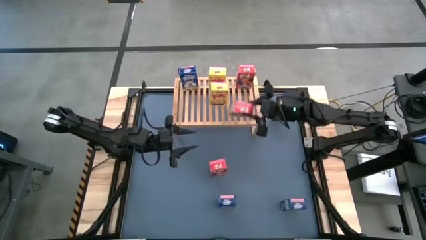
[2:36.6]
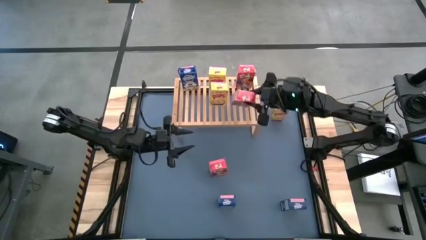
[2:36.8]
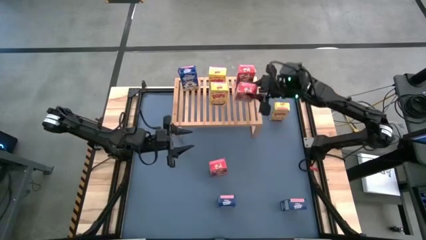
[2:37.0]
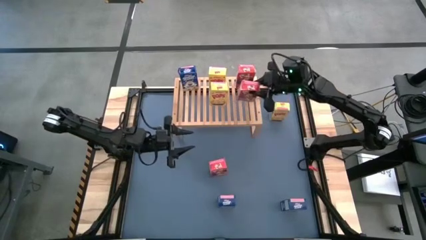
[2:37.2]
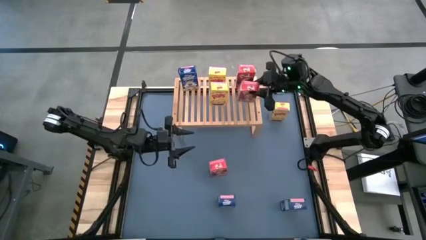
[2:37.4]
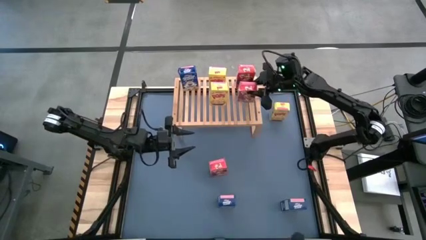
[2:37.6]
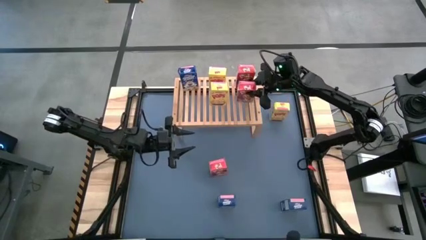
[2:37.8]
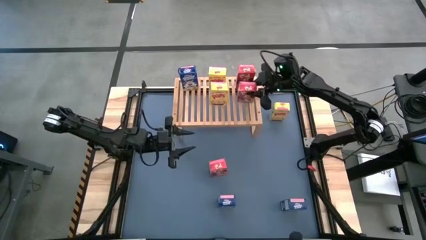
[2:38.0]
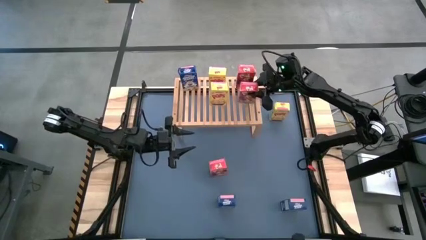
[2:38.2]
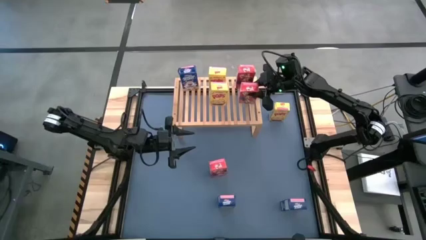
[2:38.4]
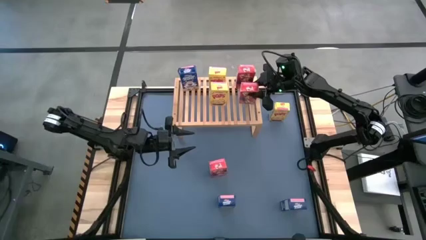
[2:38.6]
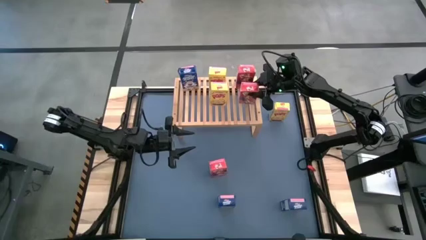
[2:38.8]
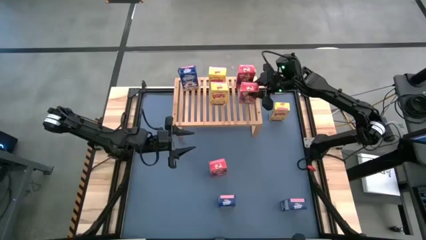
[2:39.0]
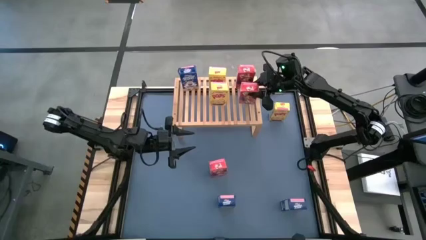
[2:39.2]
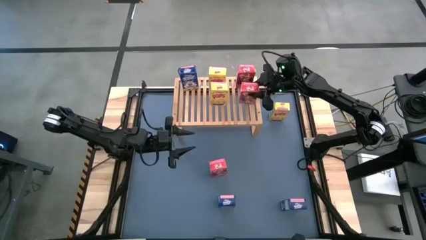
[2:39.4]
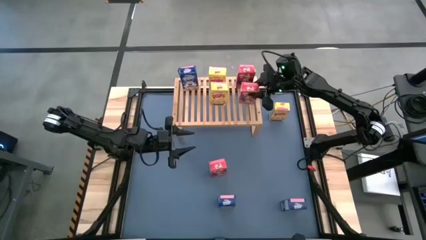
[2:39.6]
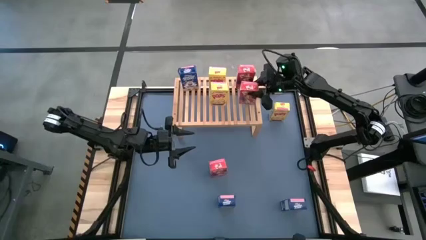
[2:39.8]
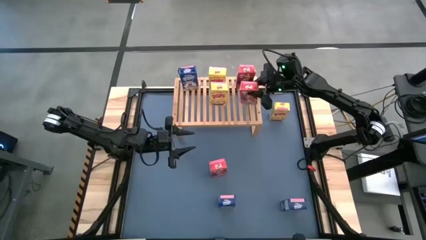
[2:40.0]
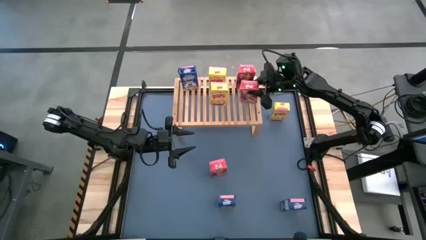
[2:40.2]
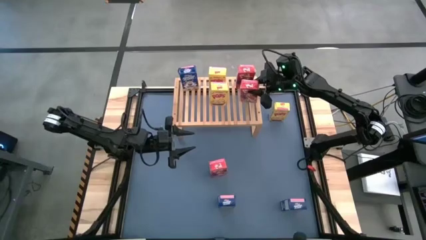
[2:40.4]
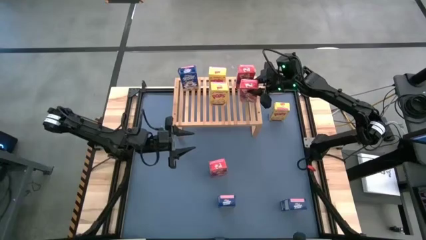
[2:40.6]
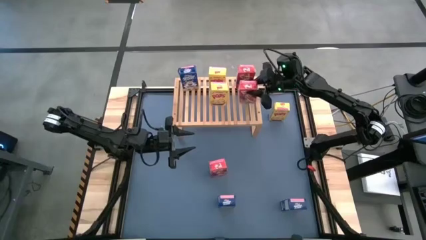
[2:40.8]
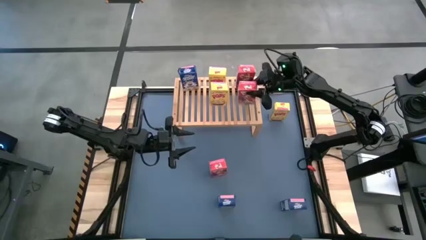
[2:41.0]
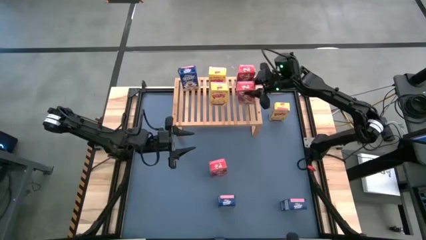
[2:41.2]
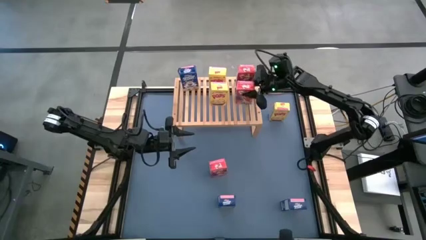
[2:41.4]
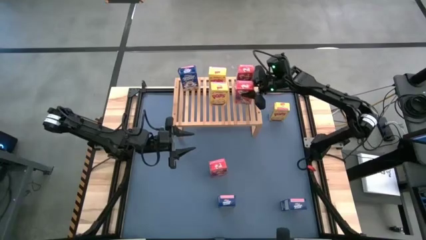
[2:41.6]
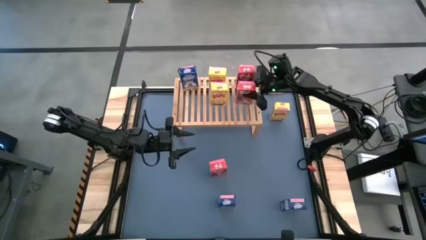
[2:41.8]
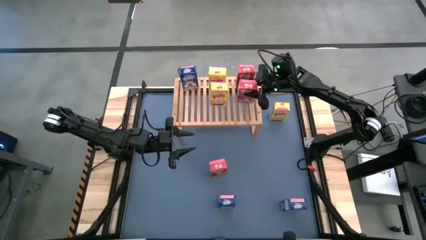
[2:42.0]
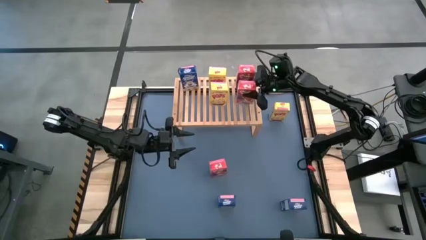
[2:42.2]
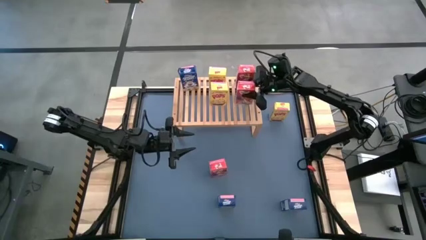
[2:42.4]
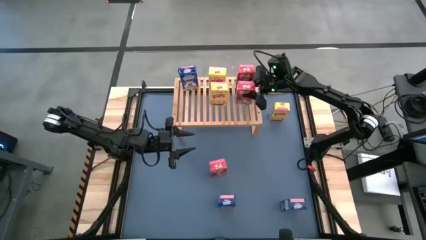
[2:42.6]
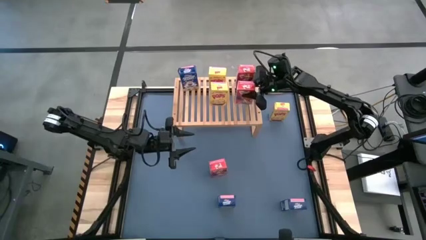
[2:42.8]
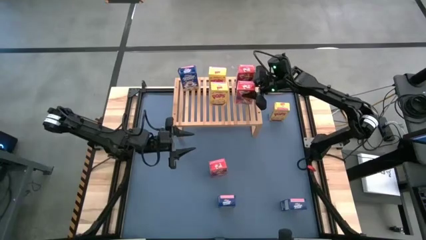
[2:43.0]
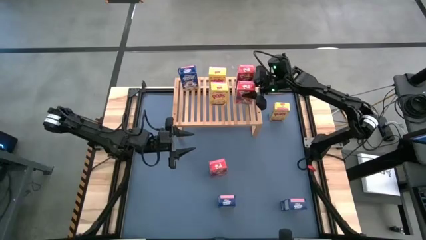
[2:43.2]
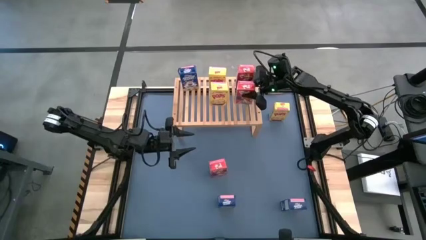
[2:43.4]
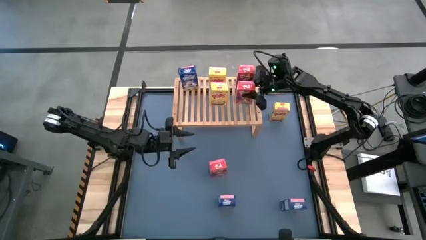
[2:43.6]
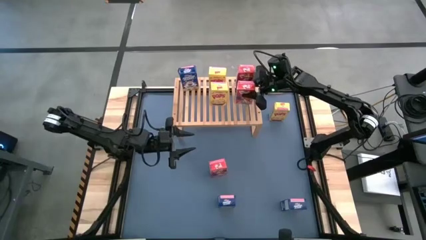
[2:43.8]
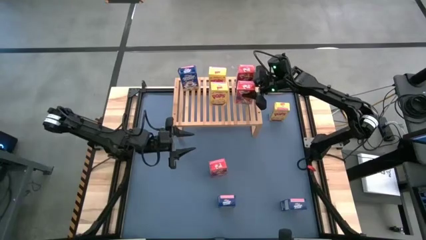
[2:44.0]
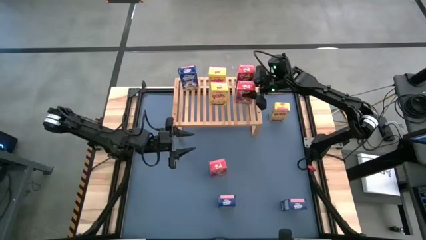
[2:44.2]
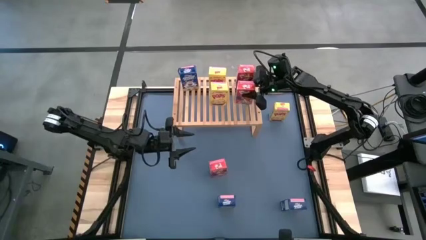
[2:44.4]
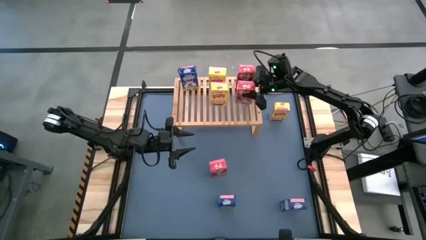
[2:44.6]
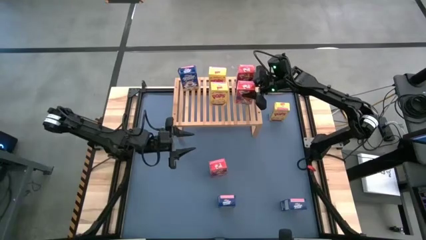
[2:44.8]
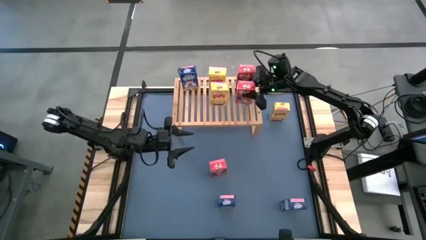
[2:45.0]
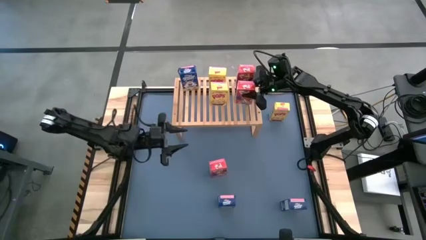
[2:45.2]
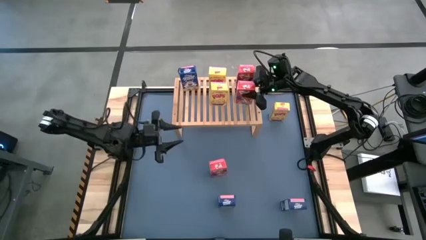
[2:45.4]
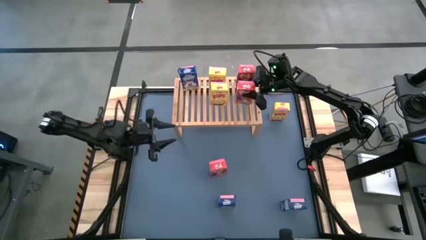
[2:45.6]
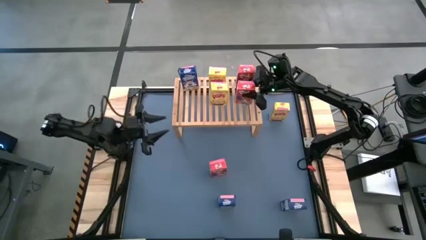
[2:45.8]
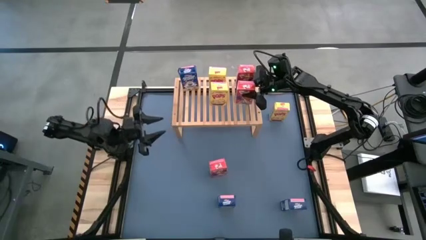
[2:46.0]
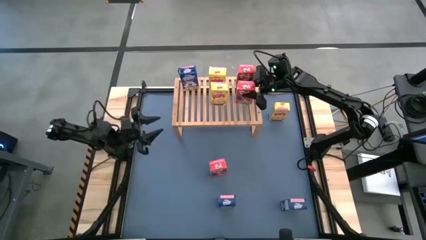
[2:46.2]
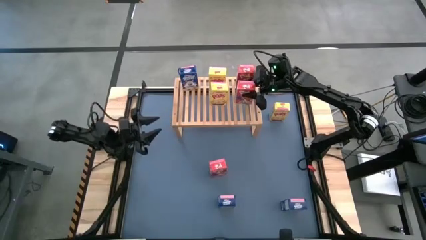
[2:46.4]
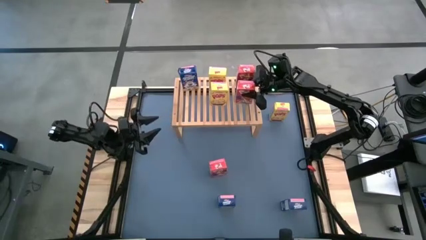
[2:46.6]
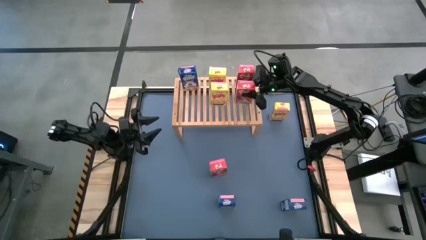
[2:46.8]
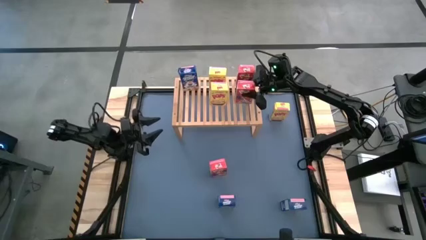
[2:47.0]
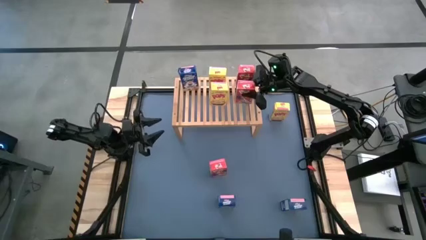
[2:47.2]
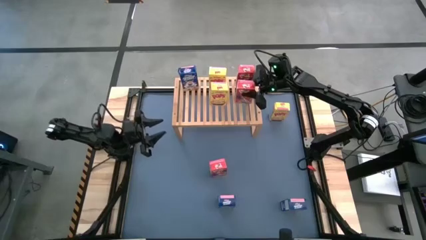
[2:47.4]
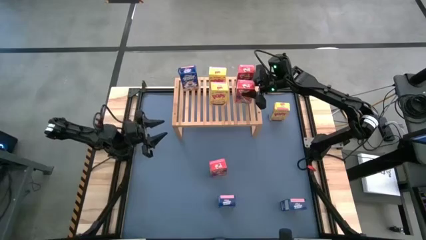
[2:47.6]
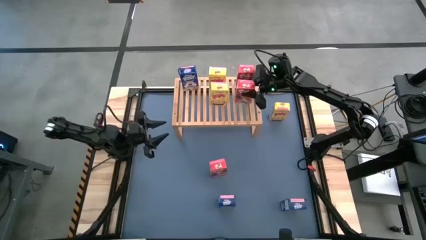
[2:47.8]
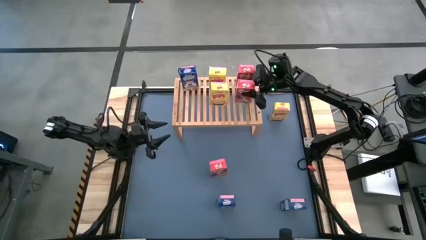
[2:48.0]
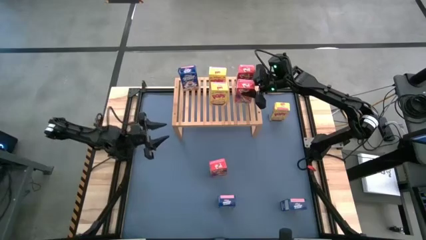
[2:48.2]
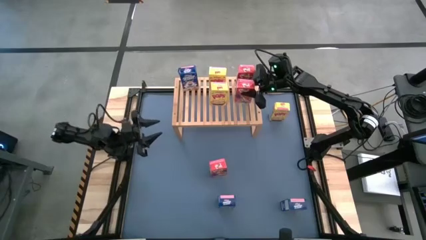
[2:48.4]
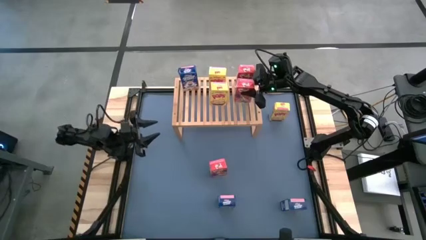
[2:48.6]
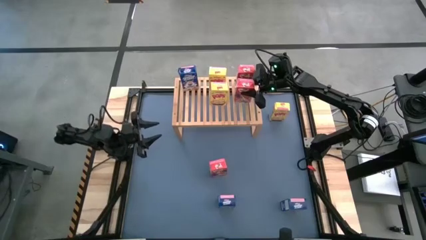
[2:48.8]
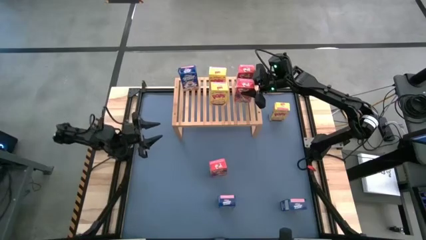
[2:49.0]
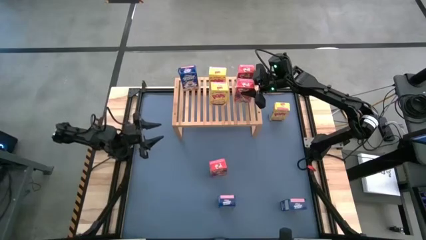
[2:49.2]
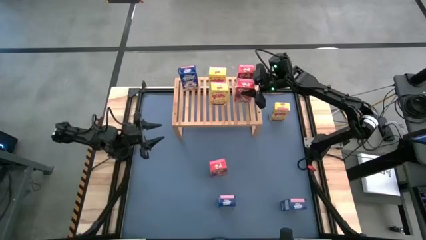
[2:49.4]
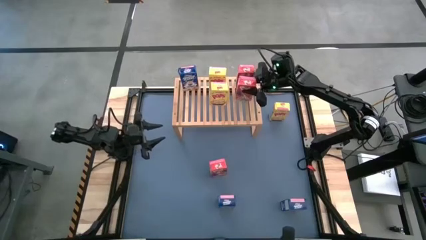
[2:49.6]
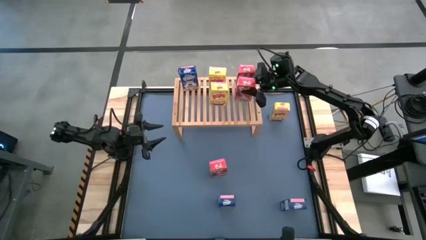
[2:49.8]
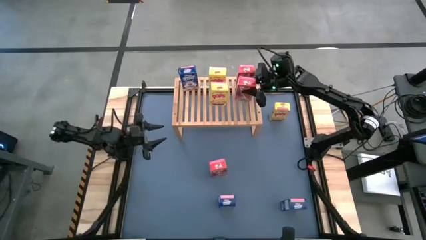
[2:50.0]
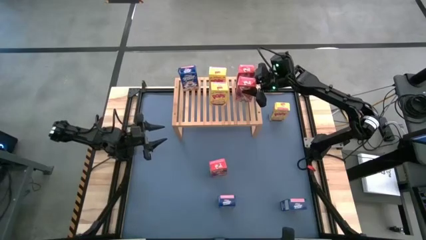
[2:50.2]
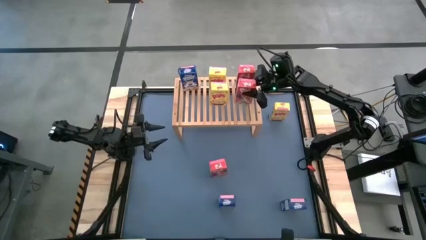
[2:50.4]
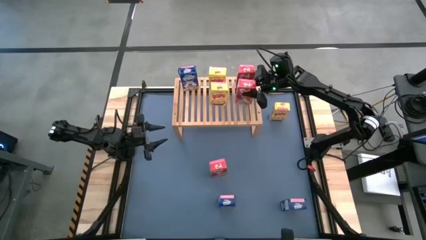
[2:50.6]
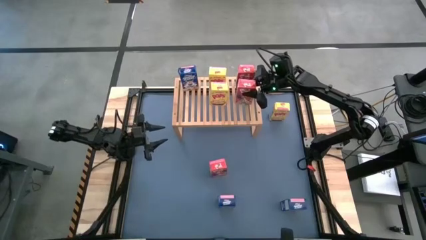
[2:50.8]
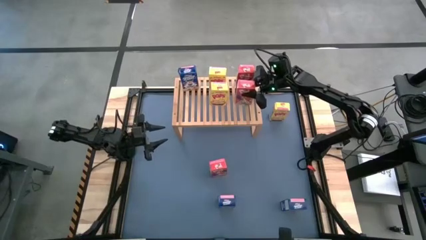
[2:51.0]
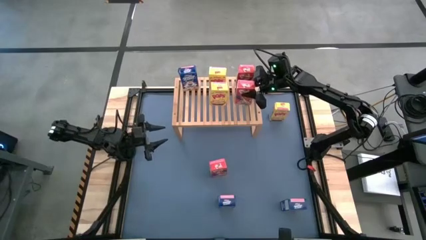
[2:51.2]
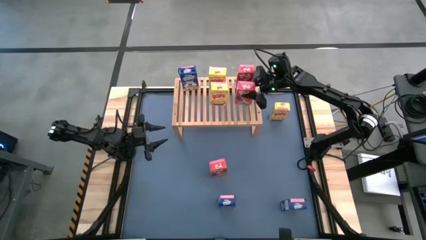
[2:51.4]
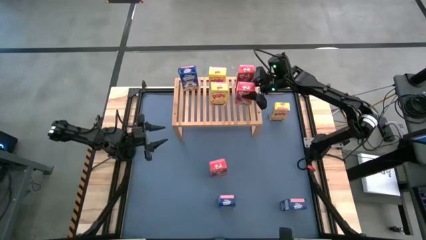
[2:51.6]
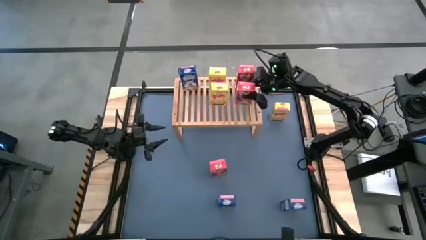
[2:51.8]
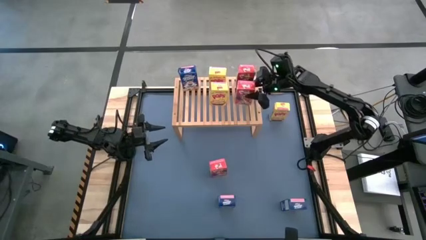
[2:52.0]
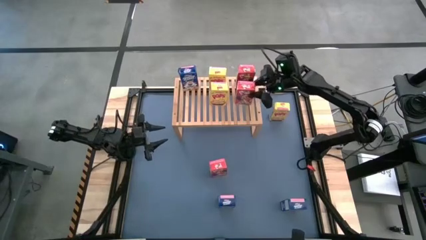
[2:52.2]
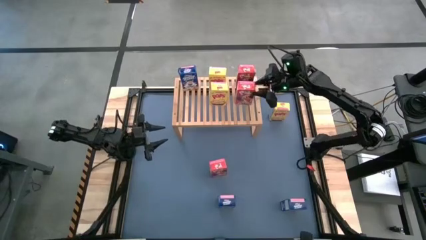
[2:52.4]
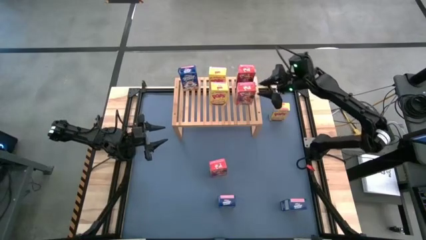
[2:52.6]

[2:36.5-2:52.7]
Task: Stack cereal on shelf
Put the top red cereal box on the shelf aligned with the other red cereal box
